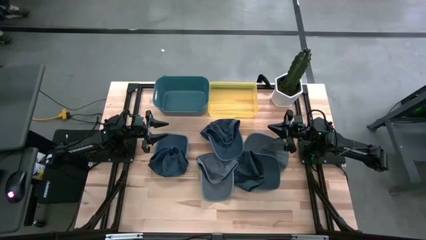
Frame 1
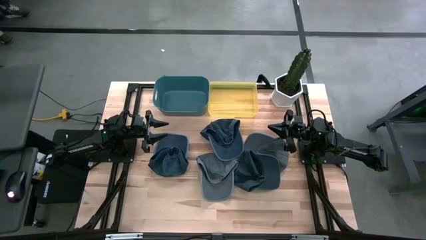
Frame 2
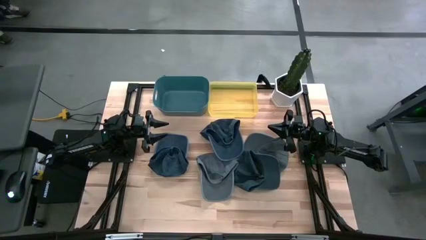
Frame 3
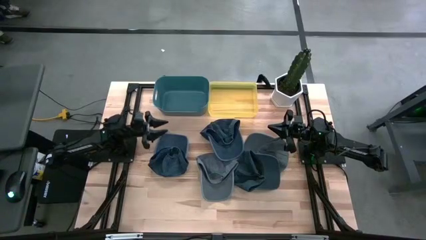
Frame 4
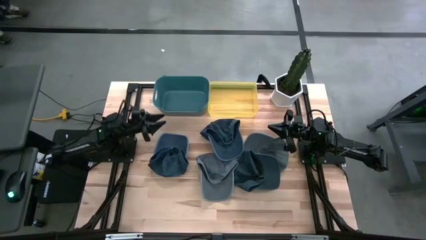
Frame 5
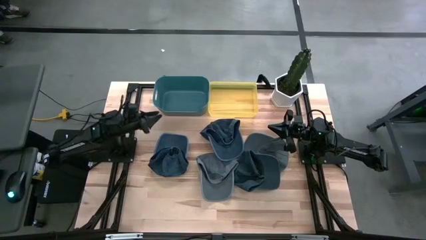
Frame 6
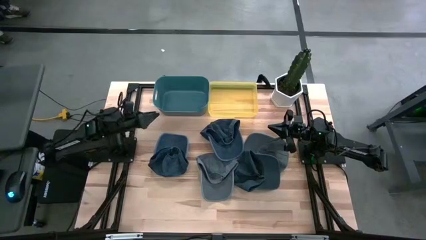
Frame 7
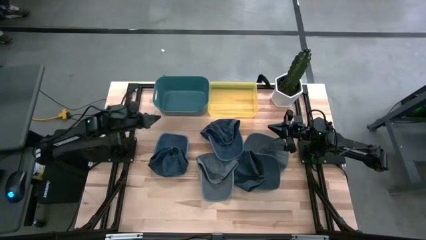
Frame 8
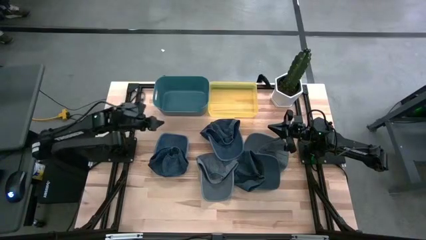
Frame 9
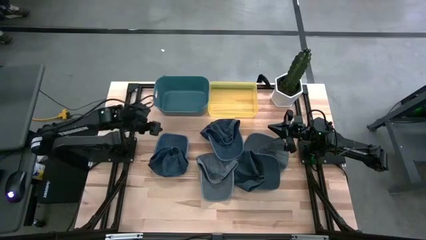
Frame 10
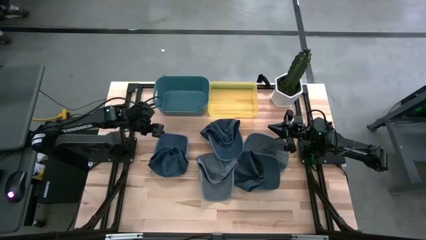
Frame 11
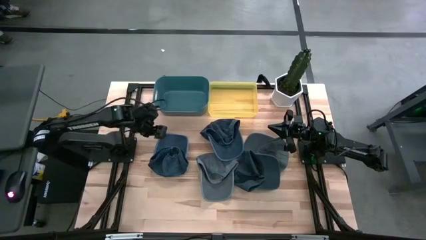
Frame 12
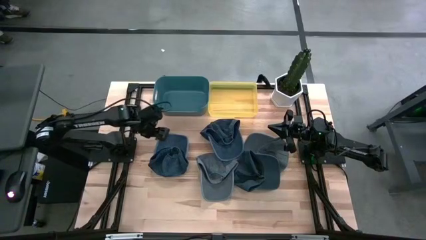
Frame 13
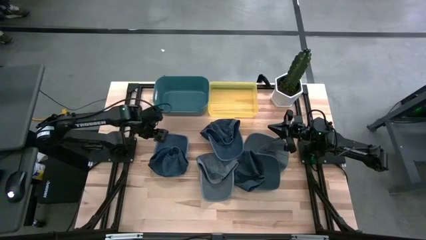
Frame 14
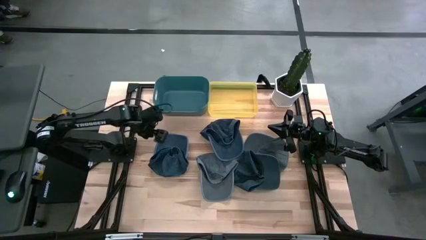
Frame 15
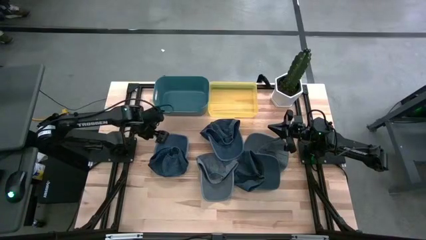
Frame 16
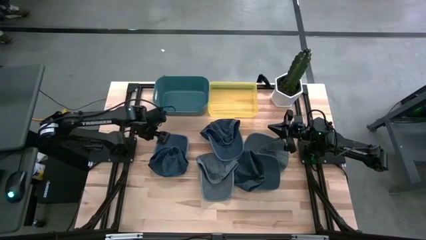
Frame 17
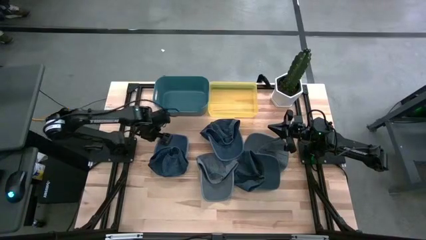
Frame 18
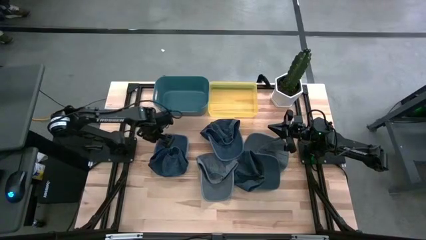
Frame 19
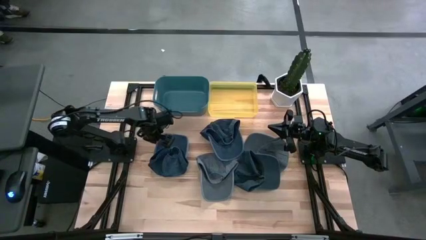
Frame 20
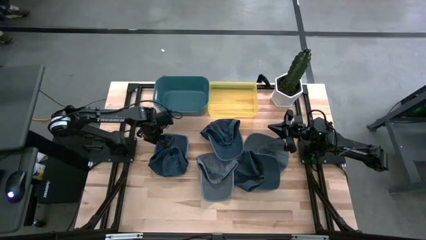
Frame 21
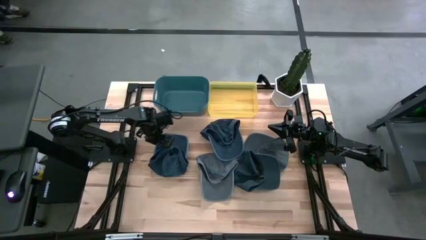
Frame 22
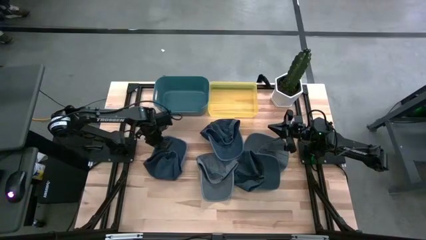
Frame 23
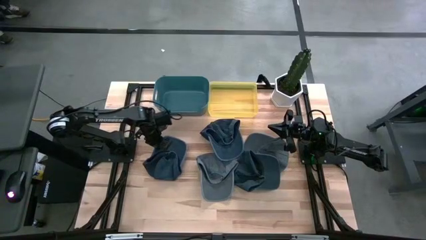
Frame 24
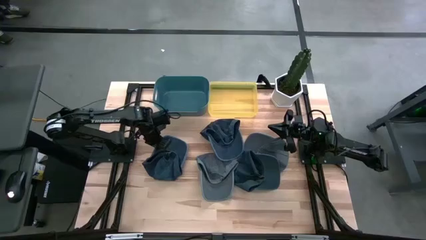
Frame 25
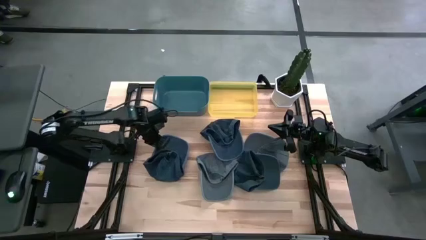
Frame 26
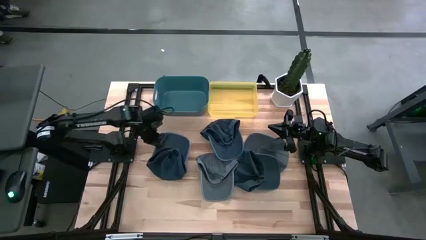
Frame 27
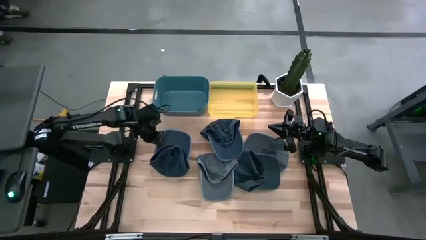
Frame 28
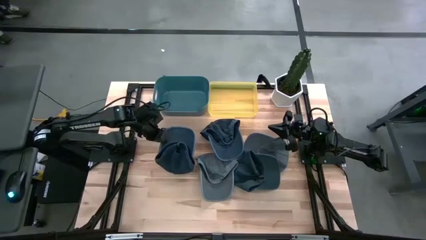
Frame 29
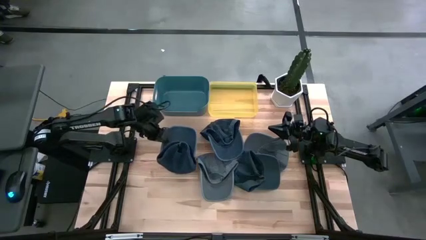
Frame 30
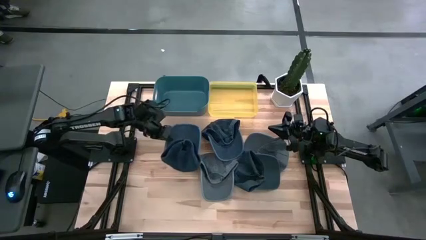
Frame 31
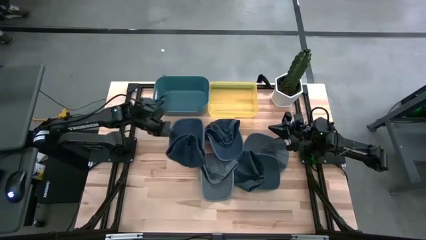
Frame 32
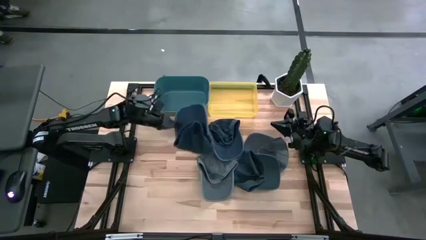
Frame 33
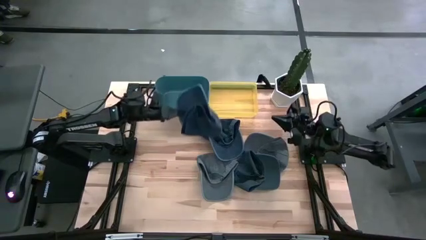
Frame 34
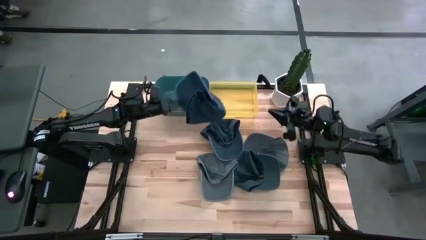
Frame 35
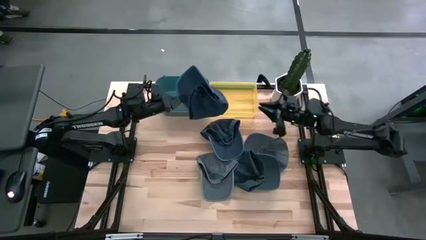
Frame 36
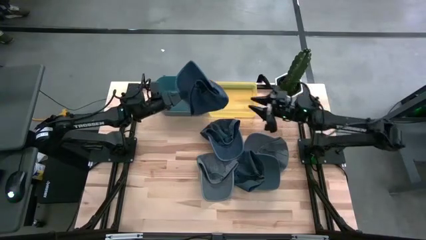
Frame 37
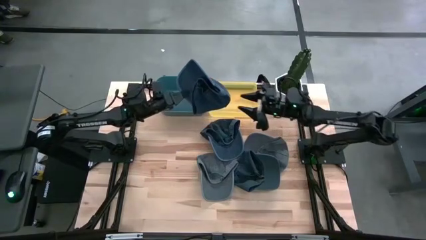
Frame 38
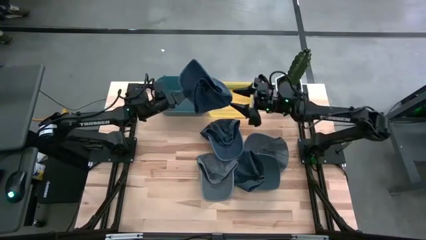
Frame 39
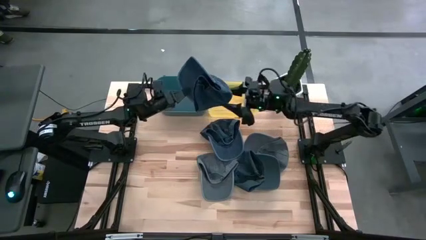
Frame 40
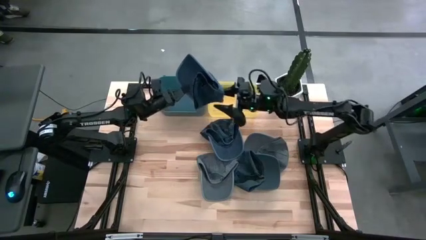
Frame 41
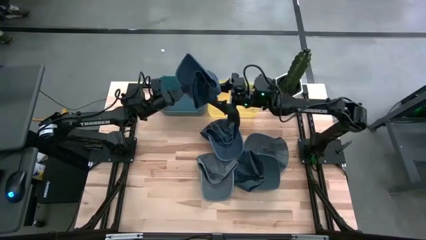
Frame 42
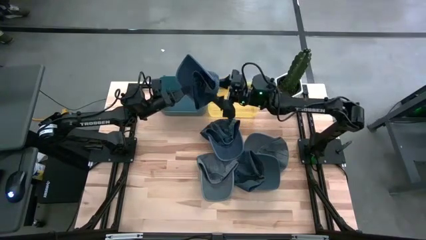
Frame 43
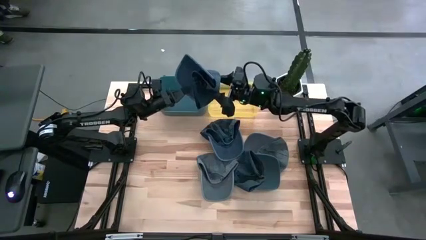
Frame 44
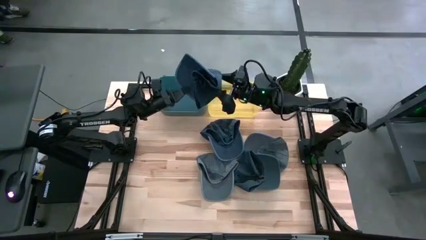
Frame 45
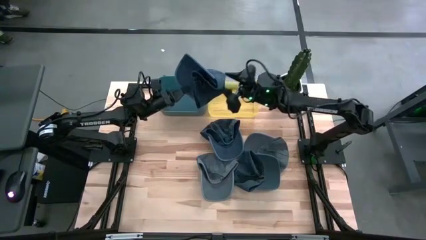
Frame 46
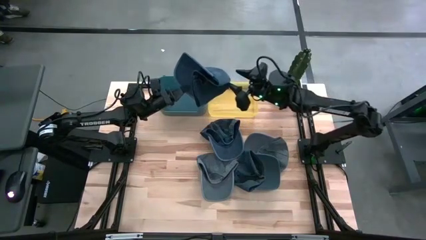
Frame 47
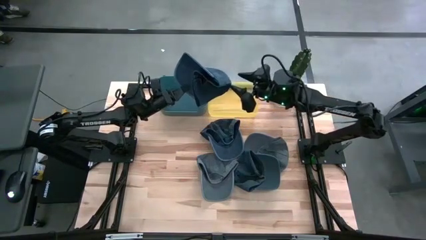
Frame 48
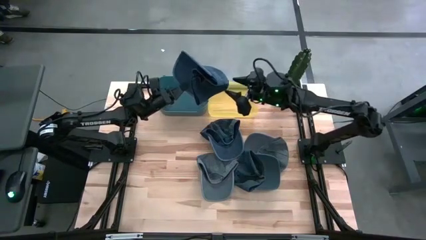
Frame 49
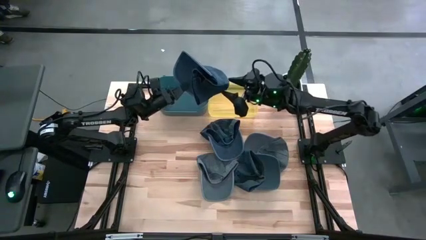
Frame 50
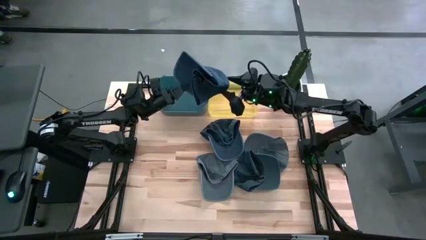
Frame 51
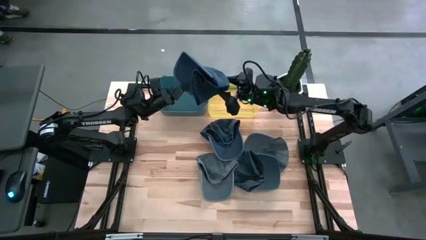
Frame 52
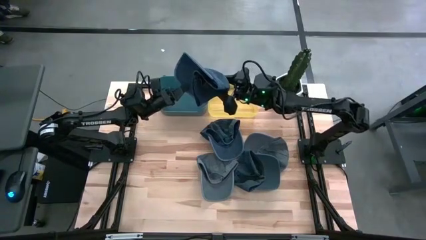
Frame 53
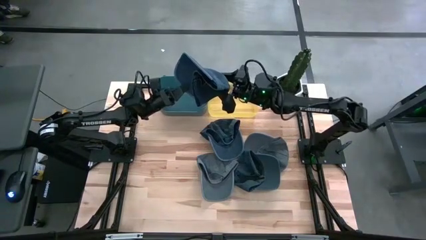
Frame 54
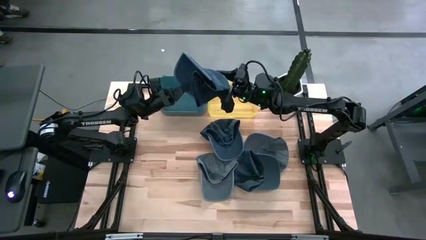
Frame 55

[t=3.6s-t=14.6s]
Task: Pick & Place hat
Put the left blue cap into the blue bin

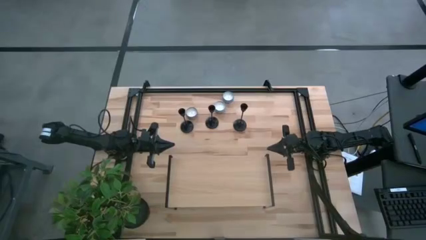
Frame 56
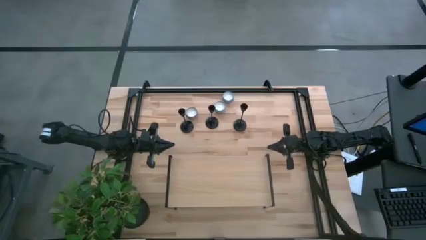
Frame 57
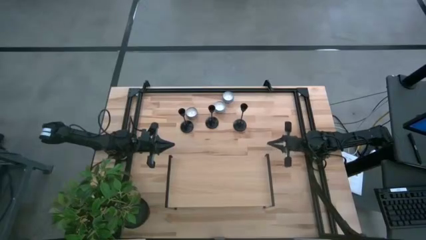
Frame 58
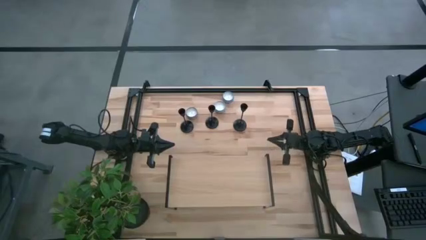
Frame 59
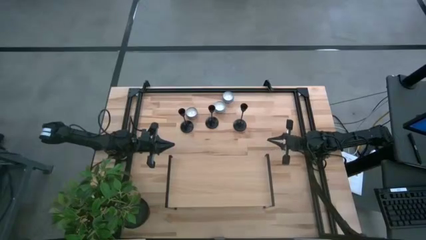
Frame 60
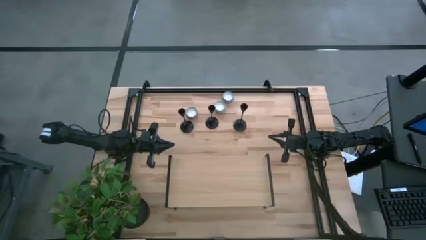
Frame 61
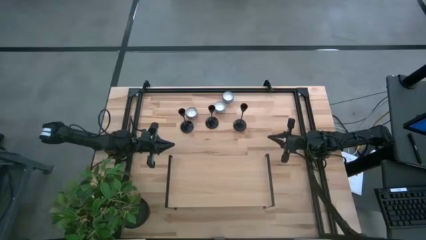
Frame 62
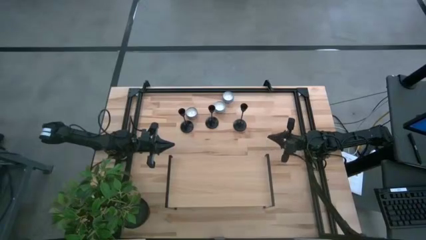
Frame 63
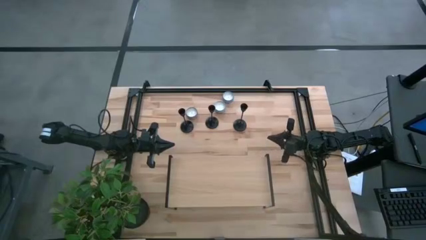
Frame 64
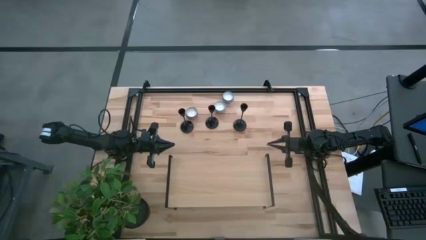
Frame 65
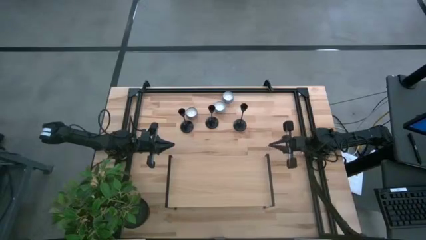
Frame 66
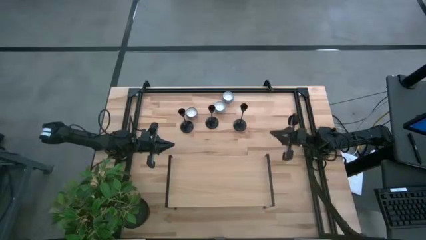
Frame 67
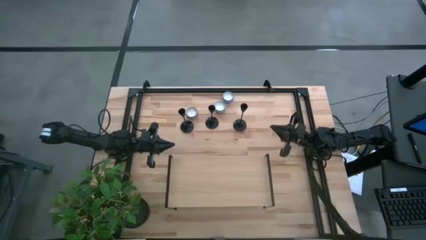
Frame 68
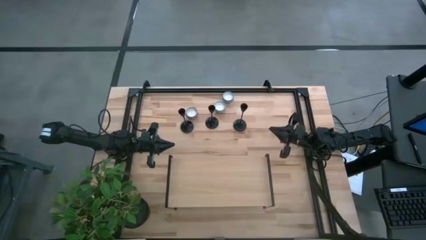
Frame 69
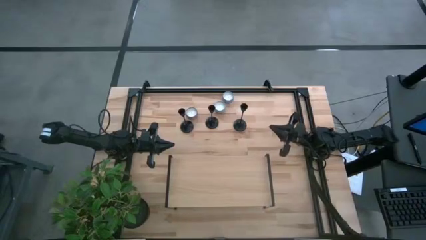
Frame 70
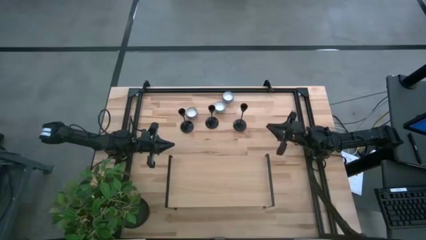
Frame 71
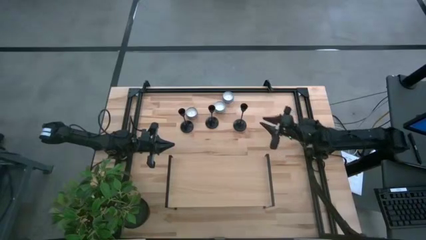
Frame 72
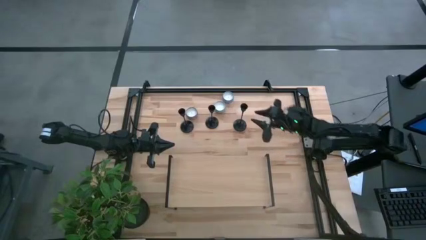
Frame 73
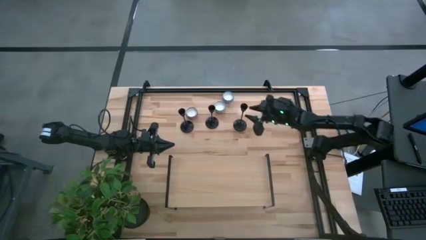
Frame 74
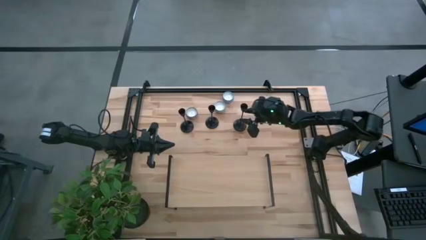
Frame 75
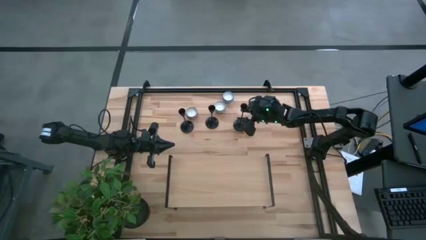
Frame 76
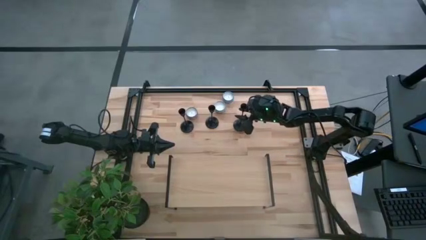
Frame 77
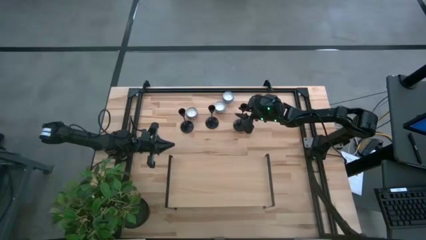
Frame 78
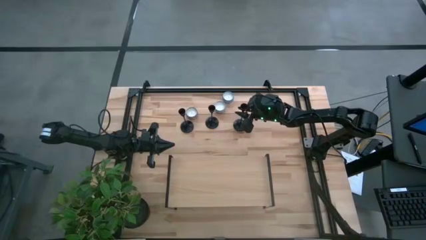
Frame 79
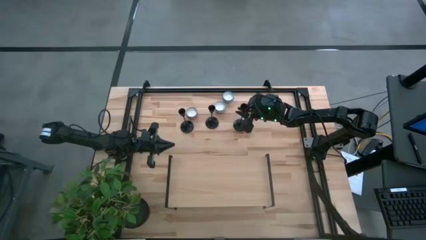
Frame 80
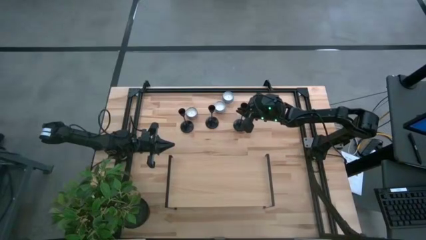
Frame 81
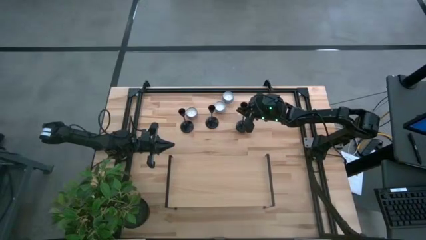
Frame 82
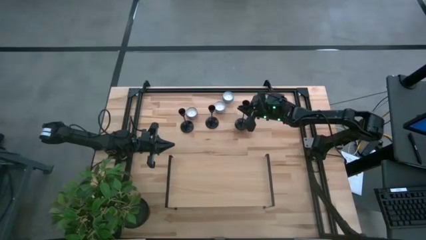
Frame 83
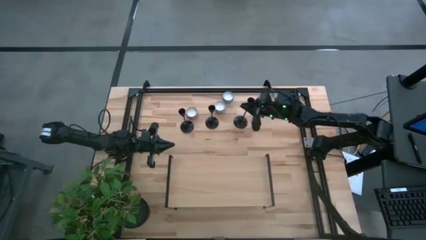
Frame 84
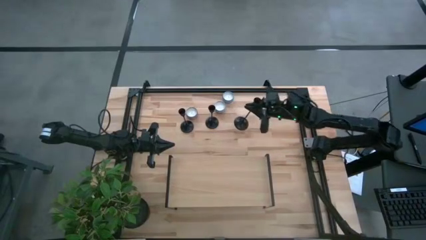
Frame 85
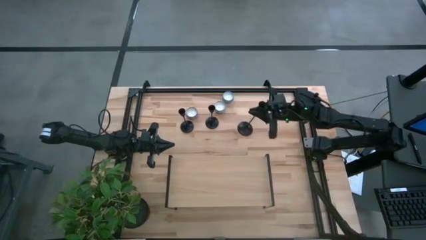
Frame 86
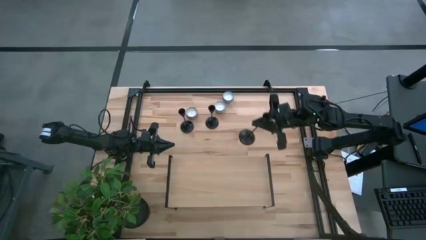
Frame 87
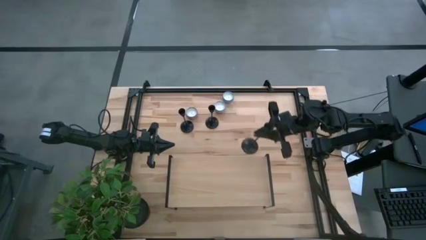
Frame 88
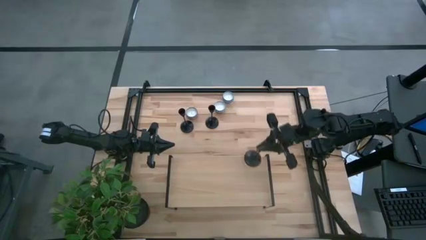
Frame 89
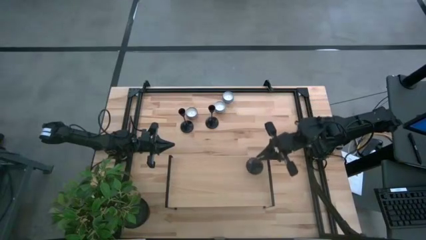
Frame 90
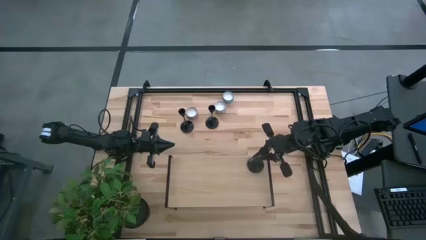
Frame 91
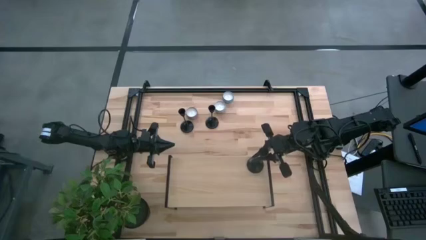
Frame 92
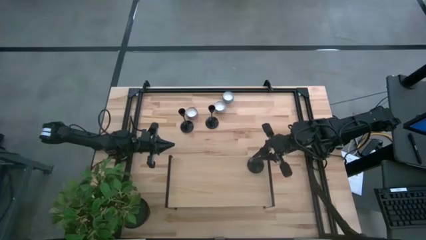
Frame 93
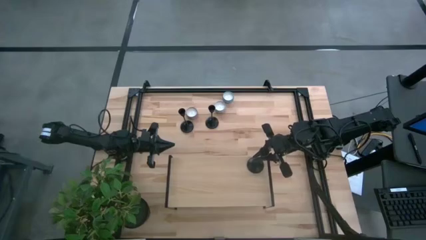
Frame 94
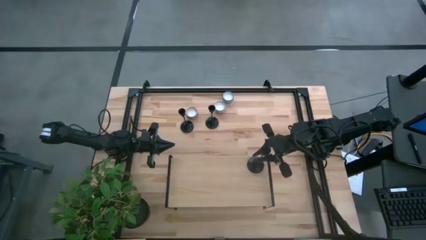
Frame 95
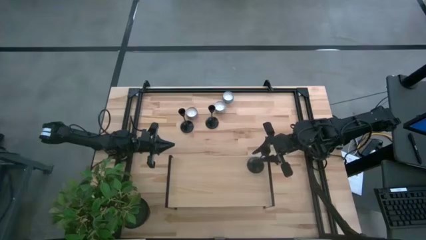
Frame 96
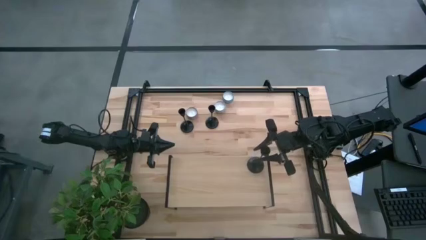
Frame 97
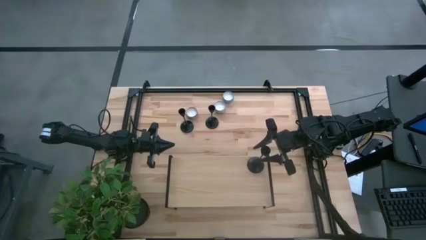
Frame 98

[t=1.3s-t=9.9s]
Task: Pick & Place candle stick holders
Put the right black candle holder on the shelf
